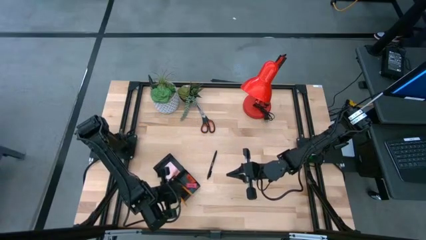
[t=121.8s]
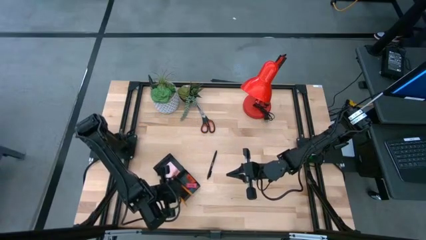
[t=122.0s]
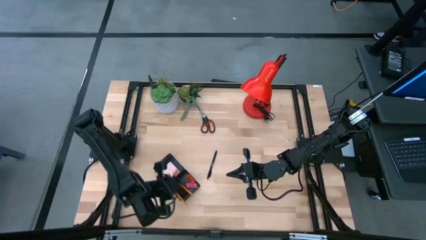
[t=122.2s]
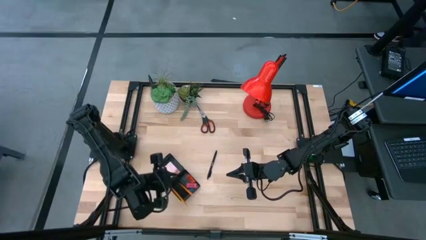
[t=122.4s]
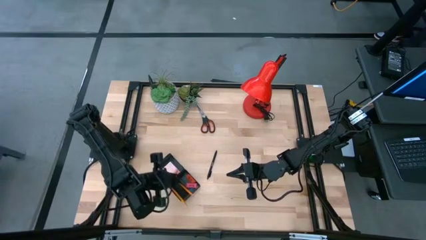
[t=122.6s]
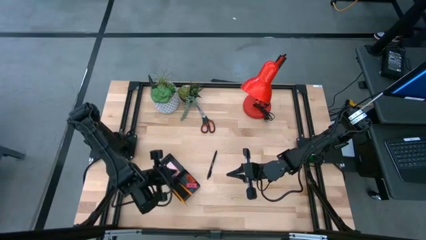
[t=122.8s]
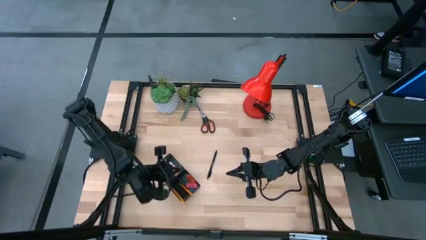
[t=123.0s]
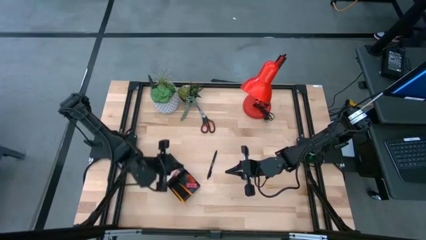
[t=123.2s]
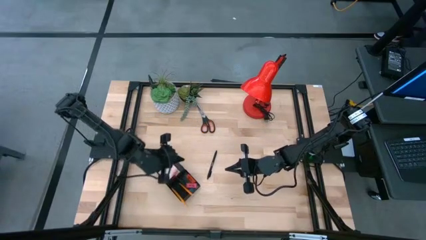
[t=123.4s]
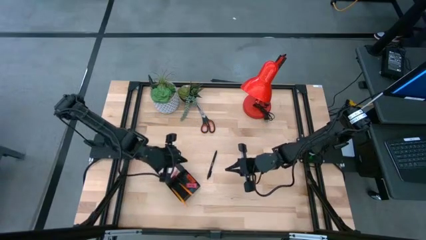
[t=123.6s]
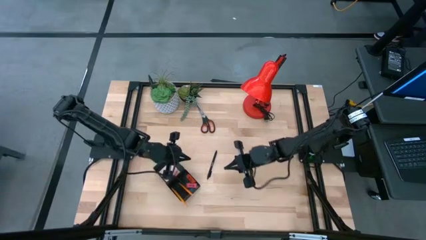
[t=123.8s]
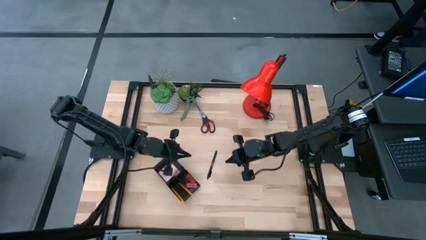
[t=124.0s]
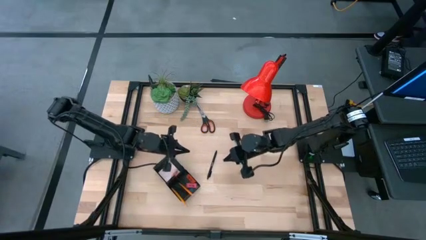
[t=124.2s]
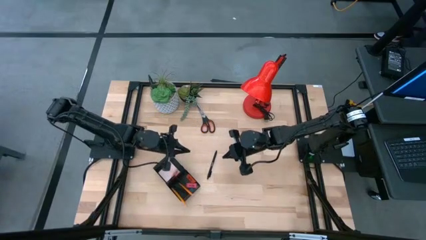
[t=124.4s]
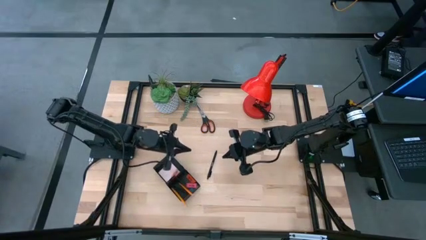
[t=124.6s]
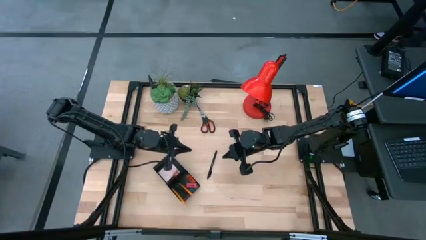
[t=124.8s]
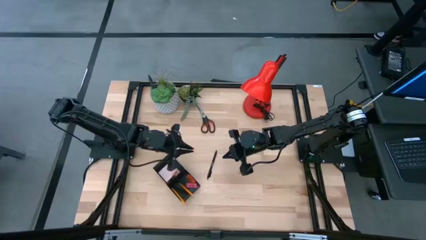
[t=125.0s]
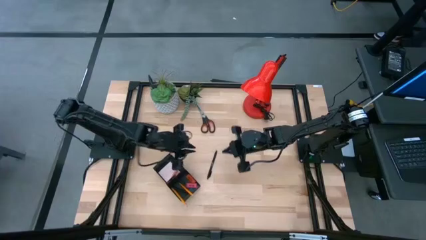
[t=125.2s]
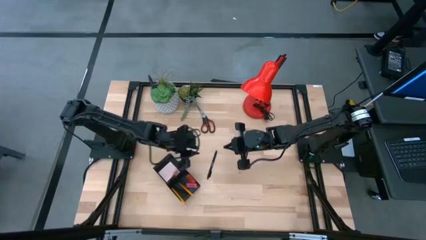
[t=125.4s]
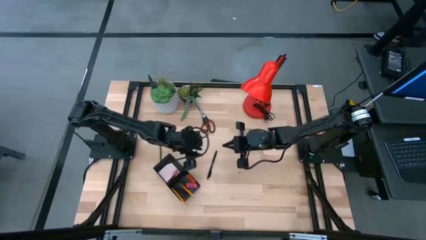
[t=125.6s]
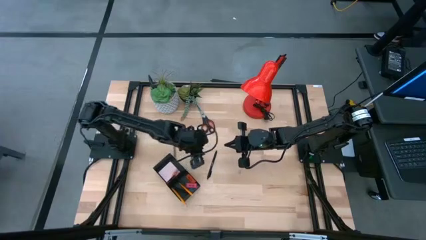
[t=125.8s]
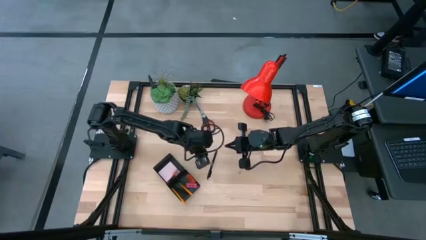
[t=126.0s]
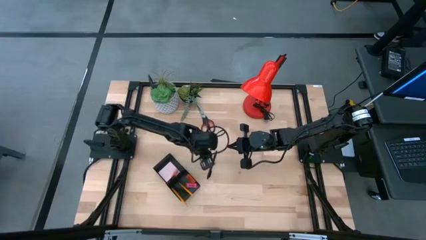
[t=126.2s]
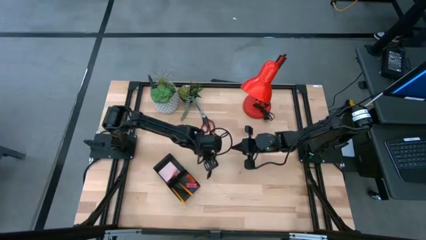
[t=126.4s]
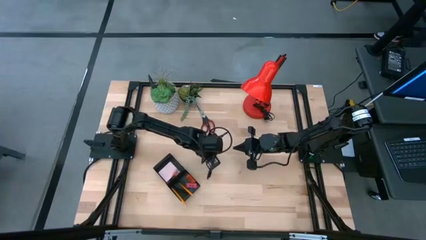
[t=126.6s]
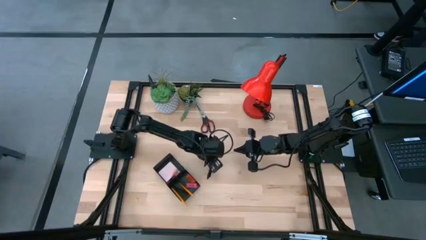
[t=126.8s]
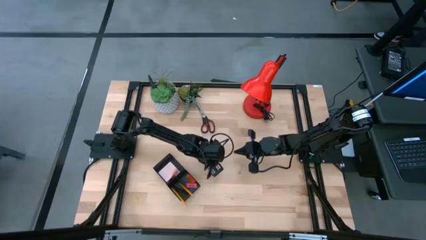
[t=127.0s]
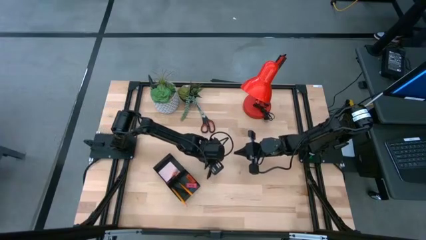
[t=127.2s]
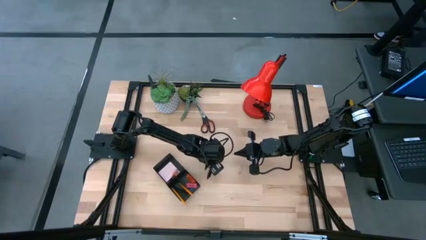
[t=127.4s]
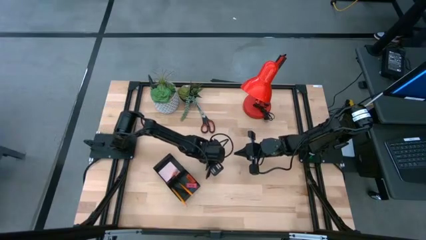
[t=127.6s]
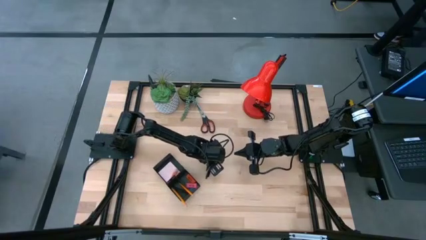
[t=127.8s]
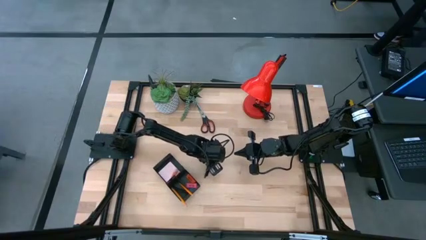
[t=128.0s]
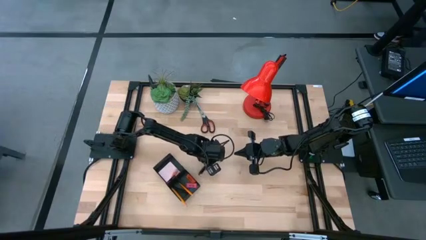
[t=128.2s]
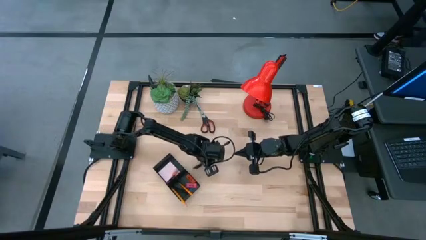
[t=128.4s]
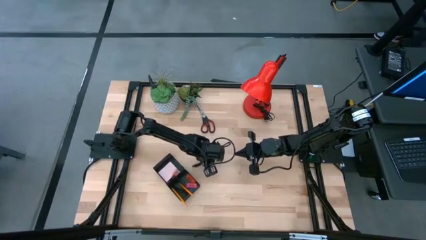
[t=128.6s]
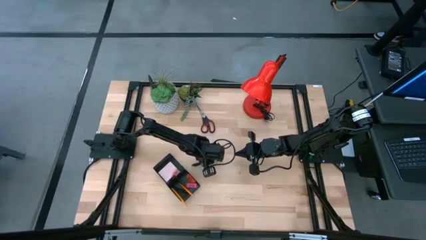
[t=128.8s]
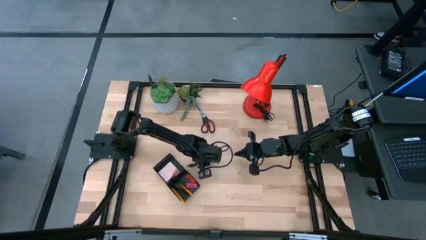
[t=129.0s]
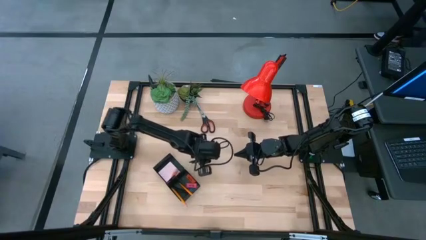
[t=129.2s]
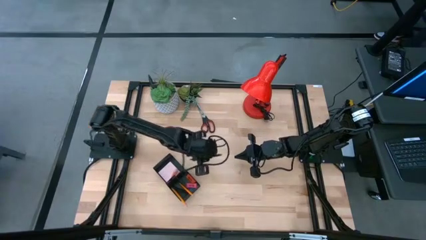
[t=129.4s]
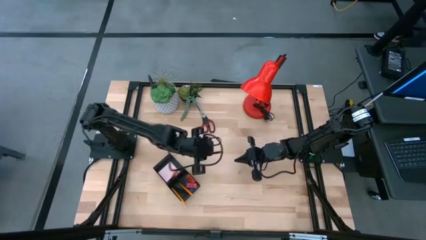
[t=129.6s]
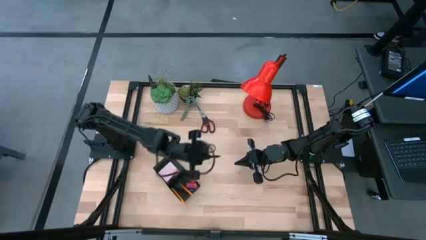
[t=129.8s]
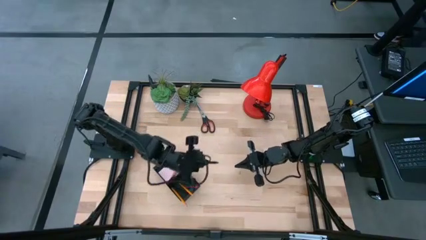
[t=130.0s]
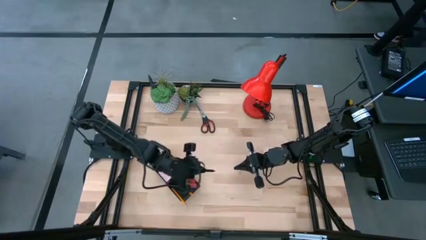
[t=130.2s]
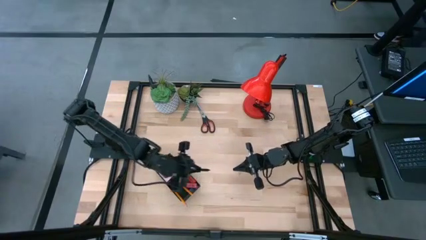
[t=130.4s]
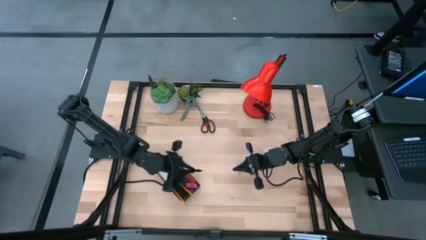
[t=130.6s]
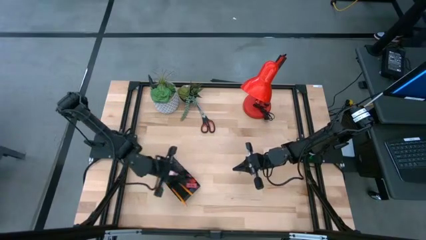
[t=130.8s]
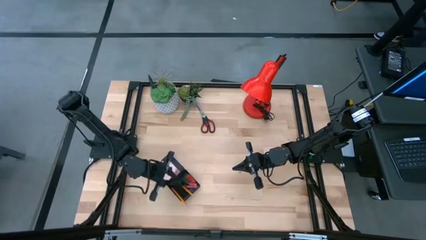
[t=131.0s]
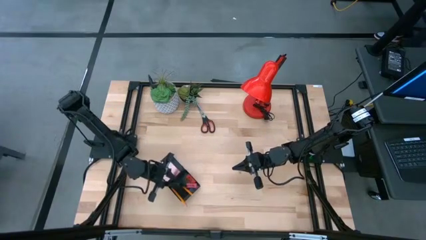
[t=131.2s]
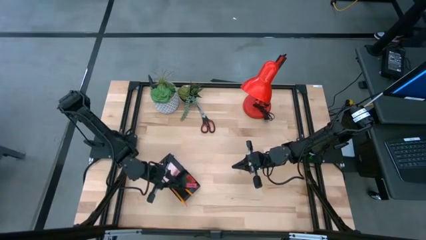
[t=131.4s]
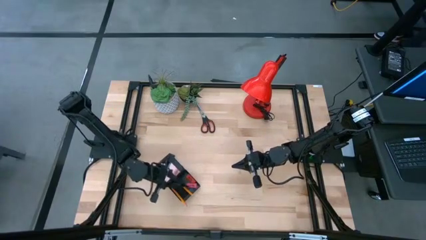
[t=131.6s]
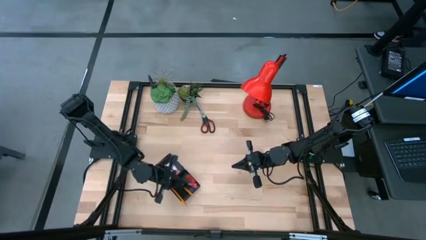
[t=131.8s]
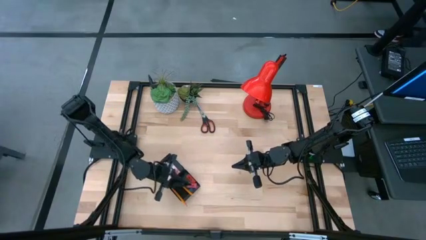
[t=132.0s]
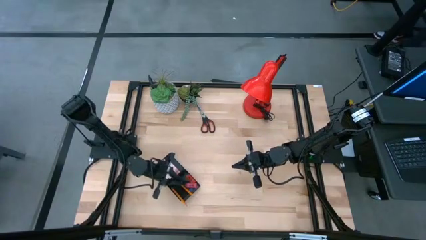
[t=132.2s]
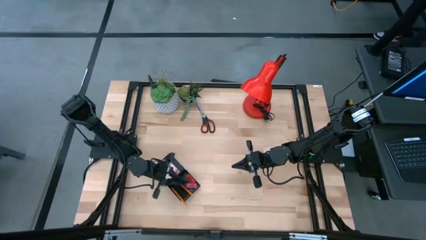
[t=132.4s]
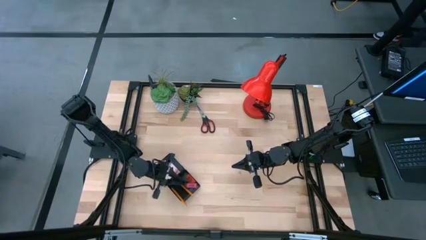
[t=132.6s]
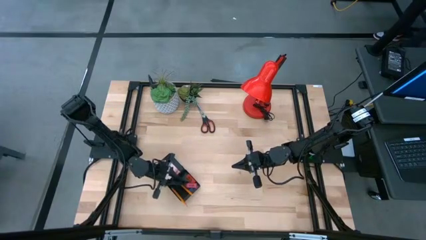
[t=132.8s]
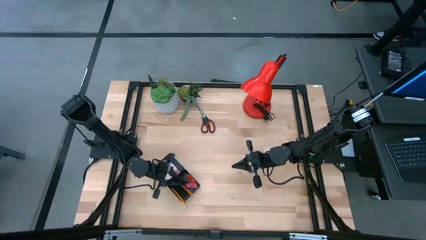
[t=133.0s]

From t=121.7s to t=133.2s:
Task: Pick and place office supplies into organizer
Put the black pen into the black desk organizer
